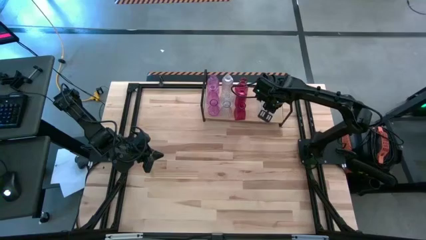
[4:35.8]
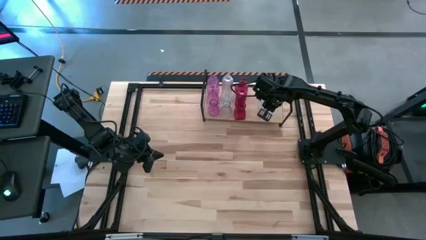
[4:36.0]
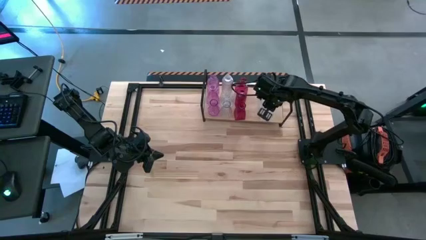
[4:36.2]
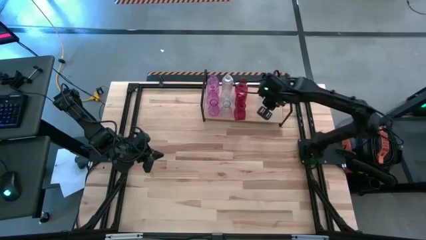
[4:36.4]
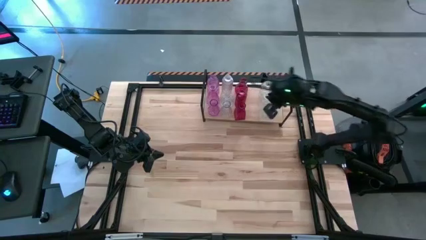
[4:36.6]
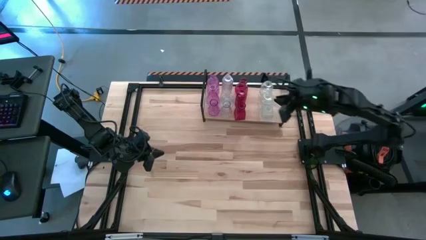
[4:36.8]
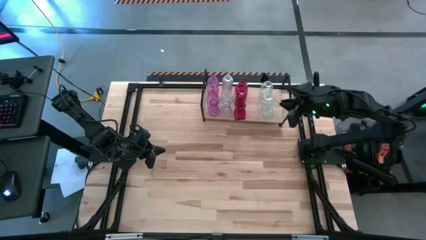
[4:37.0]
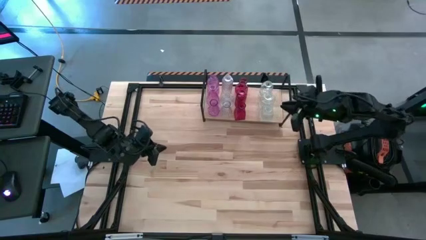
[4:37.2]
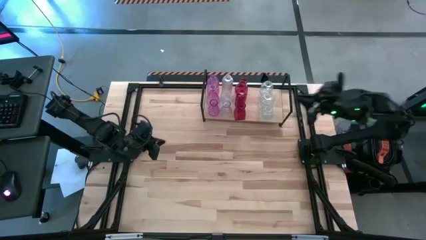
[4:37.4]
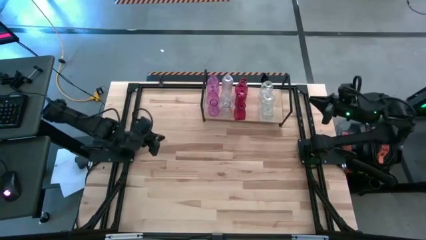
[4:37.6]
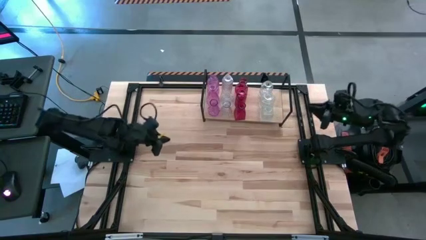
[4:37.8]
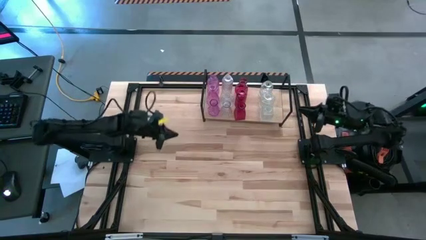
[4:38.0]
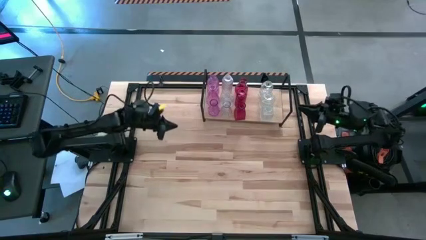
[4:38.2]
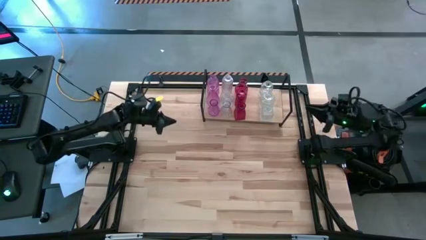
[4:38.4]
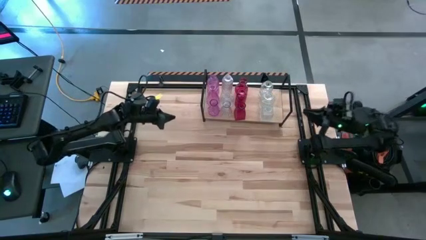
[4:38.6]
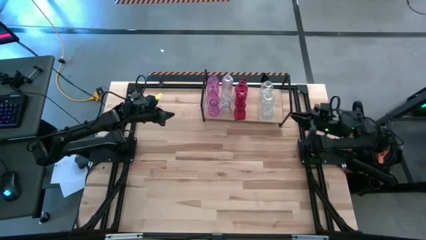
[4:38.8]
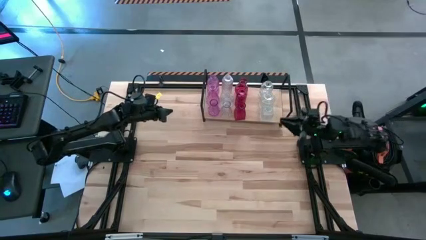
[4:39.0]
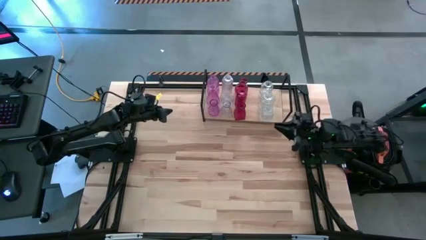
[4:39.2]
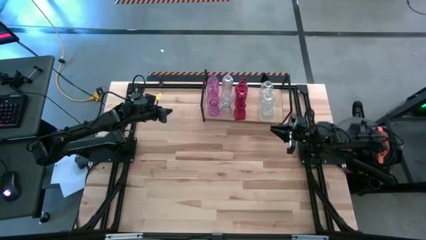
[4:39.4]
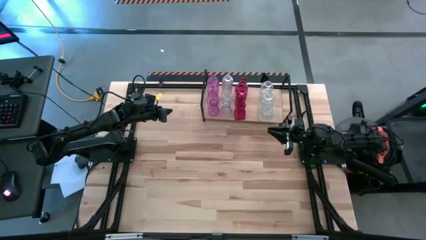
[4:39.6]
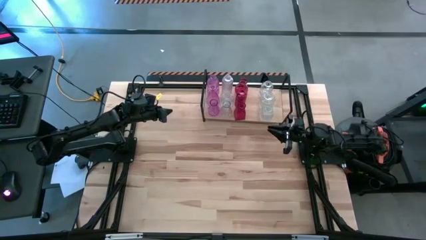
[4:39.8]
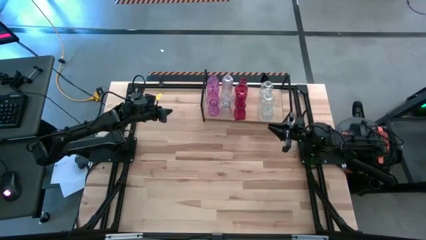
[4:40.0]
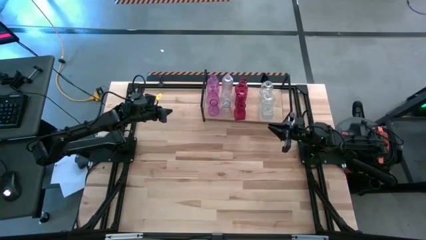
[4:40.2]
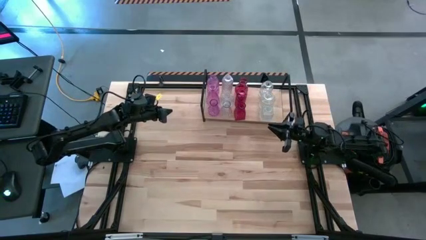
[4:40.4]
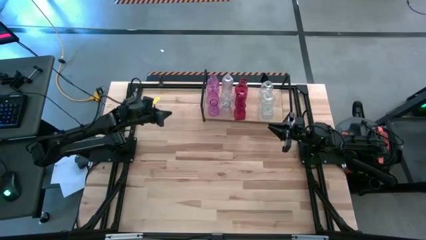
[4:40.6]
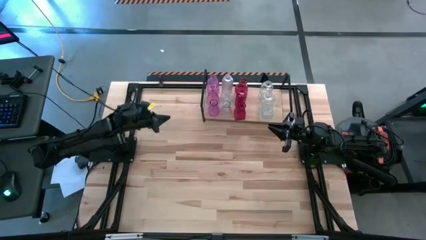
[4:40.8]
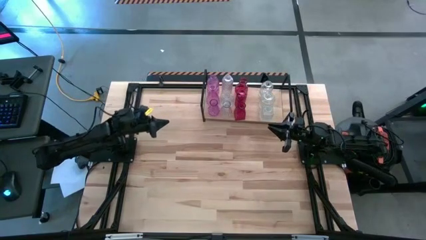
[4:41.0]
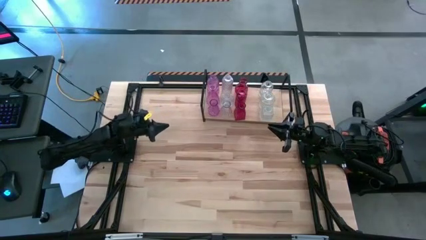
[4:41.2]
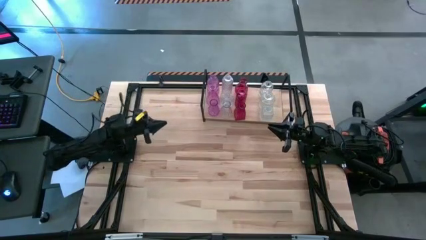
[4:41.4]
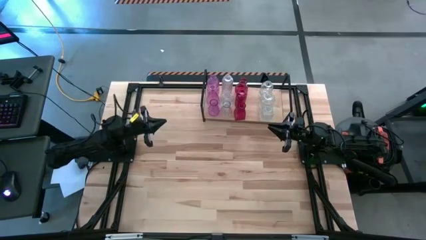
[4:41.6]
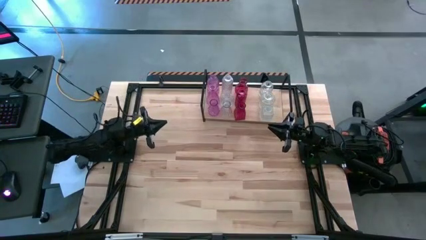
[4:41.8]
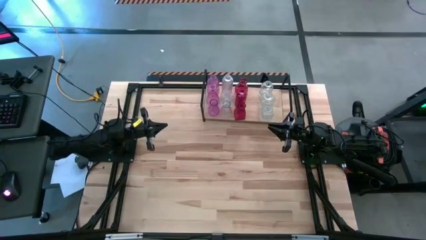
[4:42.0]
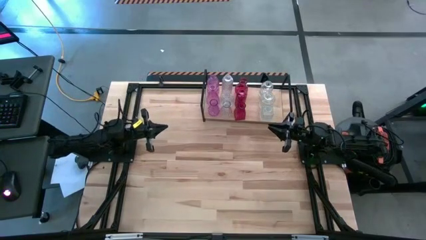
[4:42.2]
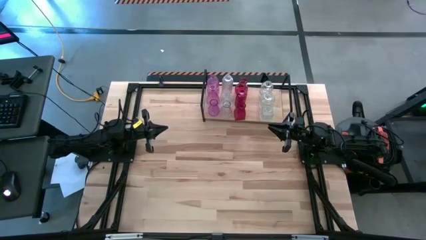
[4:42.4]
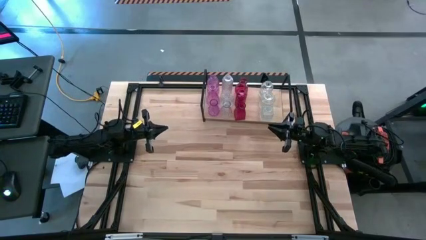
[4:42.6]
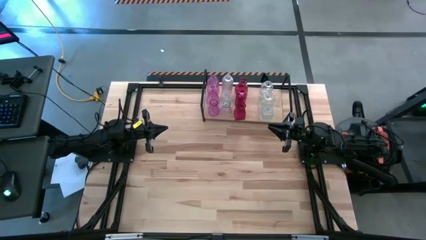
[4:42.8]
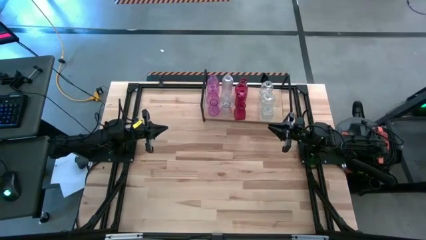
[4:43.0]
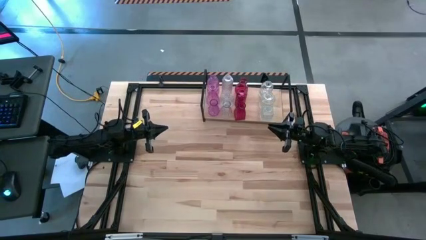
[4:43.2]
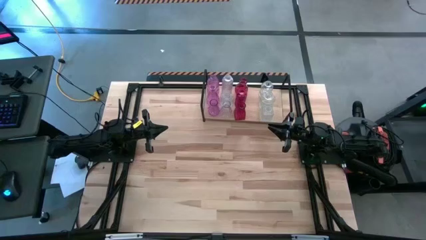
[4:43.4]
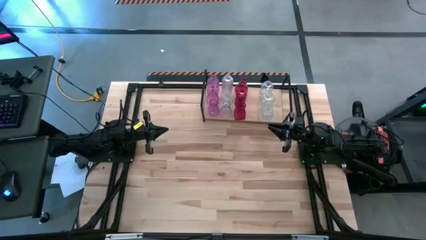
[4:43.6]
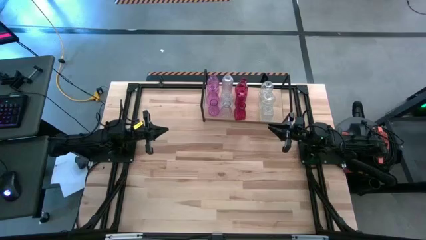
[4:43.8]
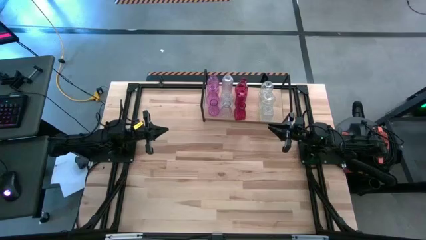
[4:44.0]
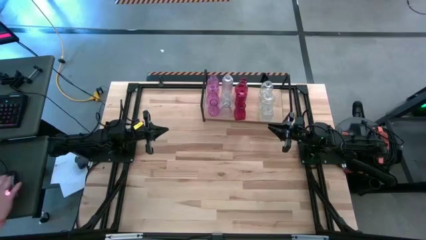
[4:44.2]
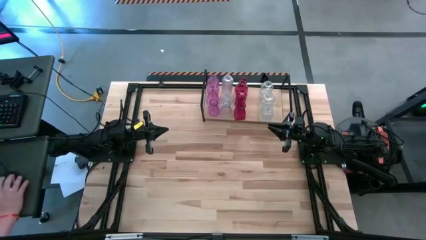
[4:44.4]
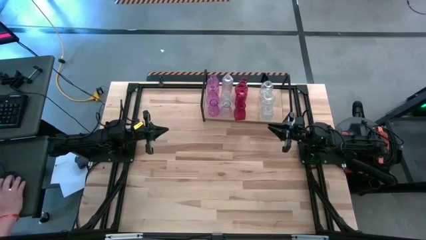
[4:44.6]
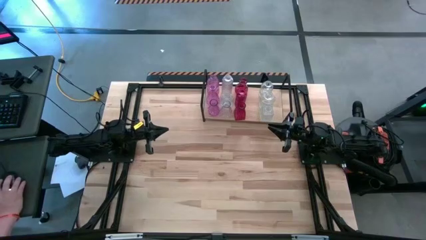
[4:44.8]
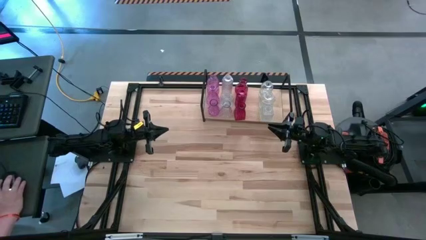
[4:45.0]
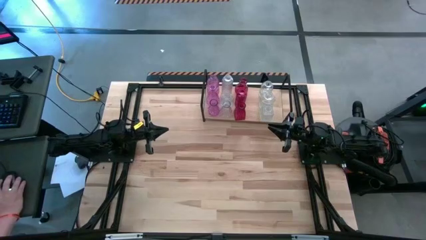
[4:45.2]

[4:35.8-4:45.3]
Task: sort vases onto shelf
Return to Home Position

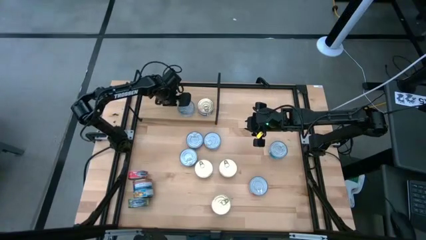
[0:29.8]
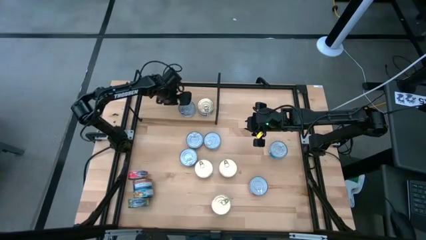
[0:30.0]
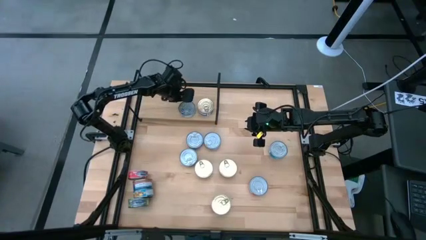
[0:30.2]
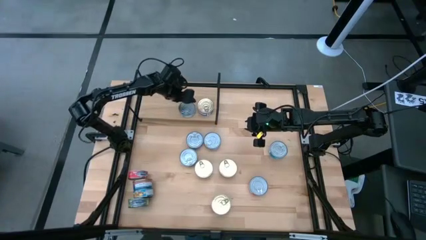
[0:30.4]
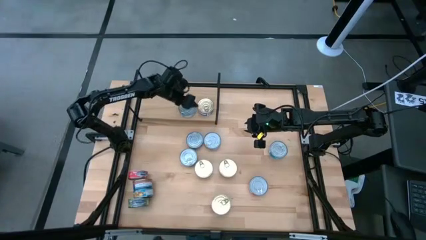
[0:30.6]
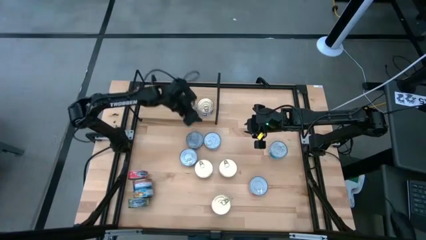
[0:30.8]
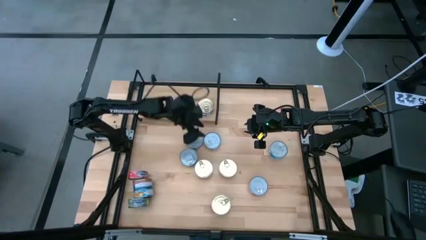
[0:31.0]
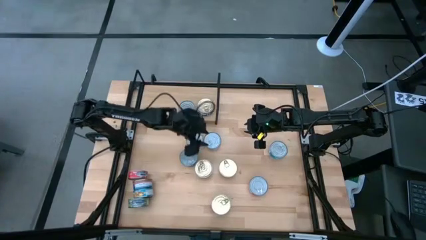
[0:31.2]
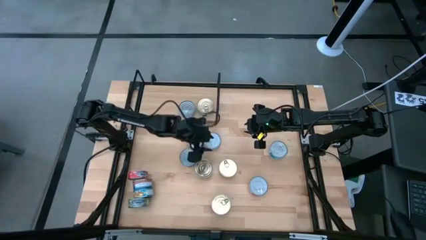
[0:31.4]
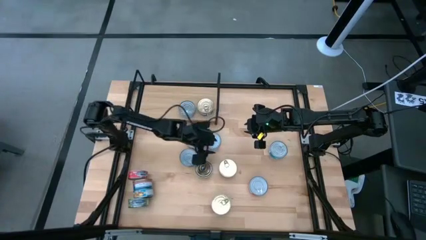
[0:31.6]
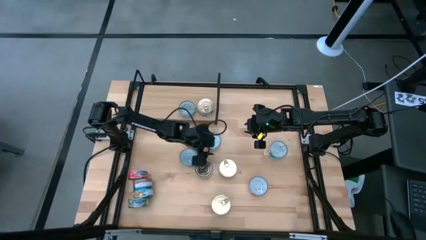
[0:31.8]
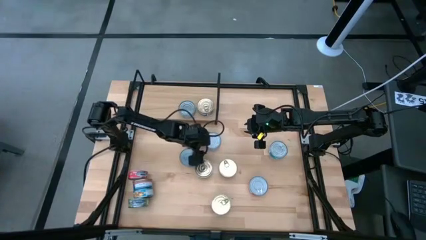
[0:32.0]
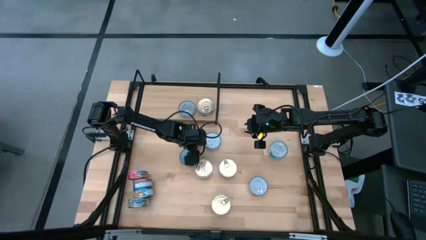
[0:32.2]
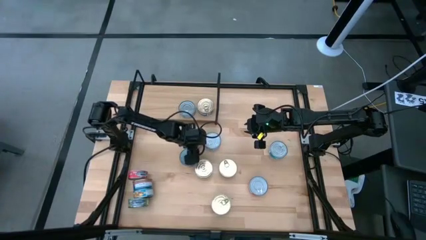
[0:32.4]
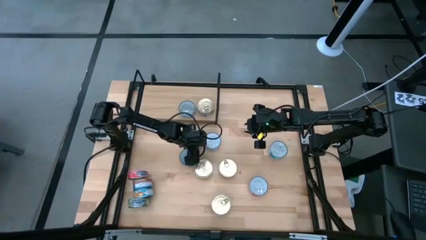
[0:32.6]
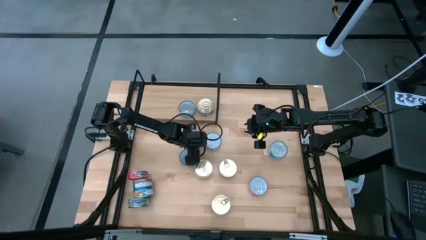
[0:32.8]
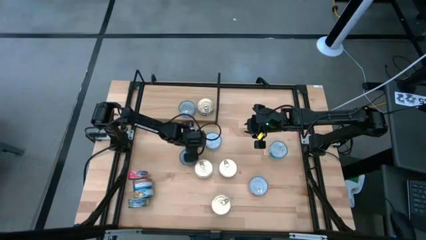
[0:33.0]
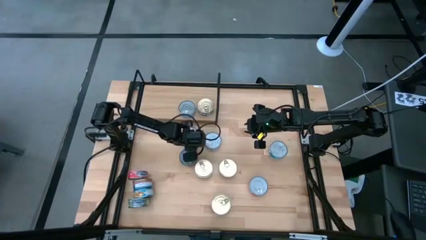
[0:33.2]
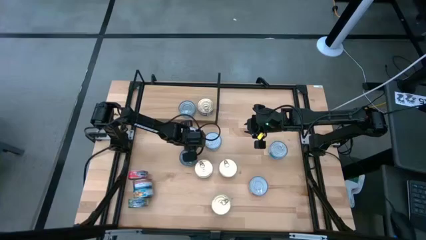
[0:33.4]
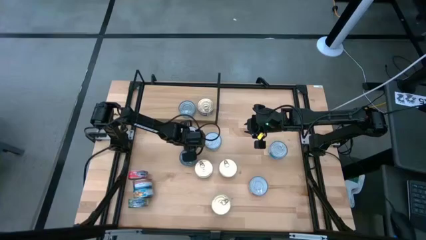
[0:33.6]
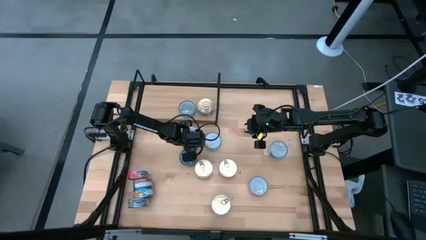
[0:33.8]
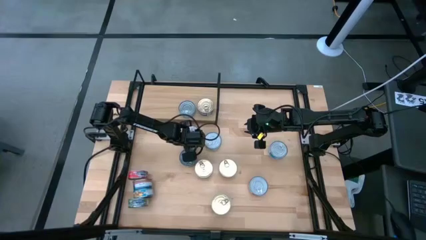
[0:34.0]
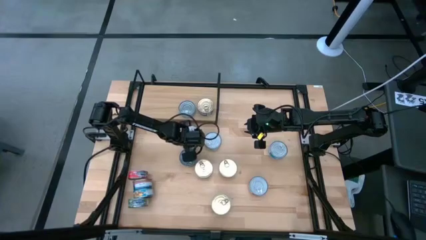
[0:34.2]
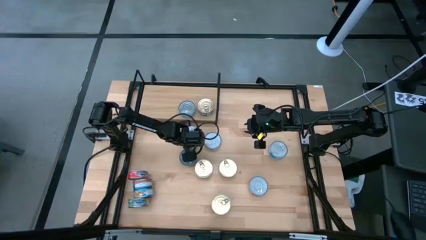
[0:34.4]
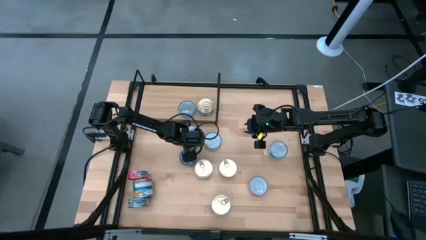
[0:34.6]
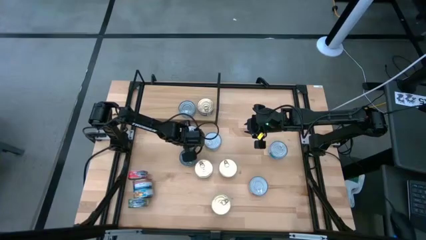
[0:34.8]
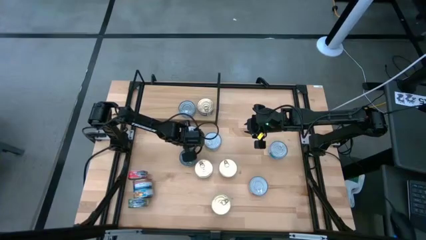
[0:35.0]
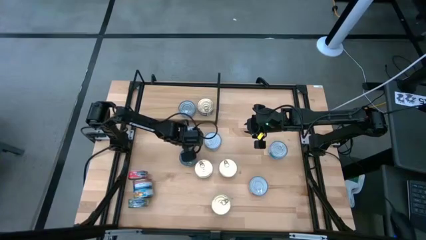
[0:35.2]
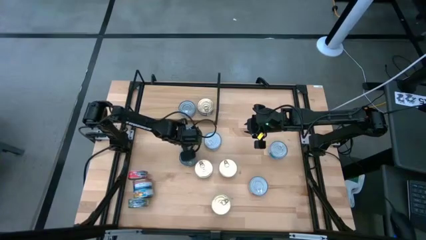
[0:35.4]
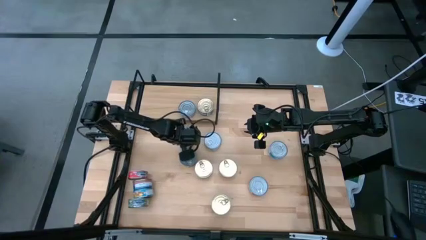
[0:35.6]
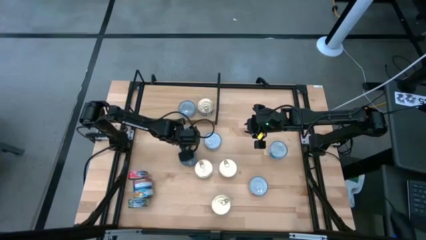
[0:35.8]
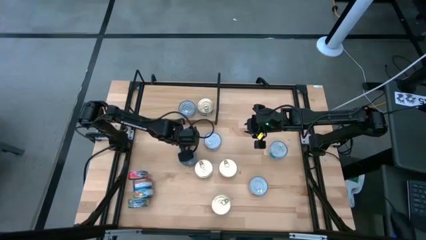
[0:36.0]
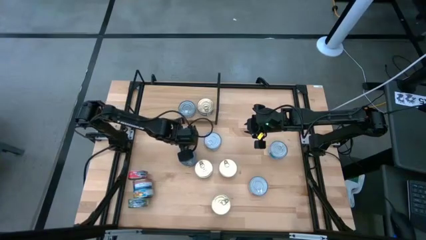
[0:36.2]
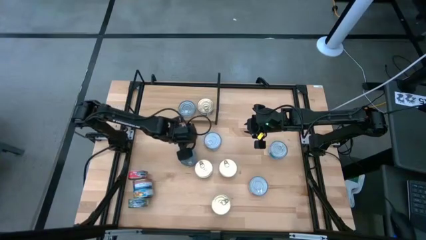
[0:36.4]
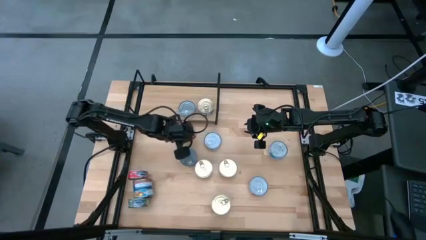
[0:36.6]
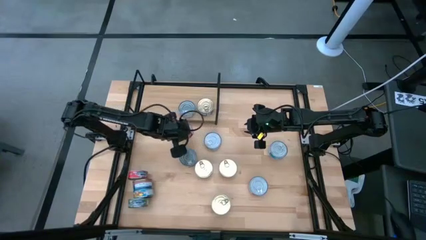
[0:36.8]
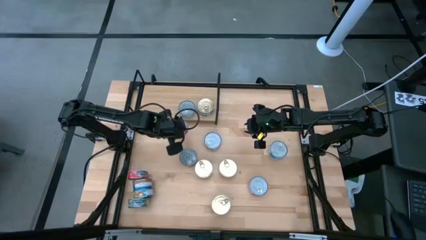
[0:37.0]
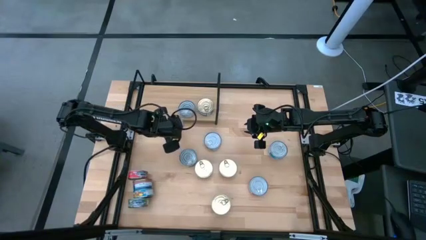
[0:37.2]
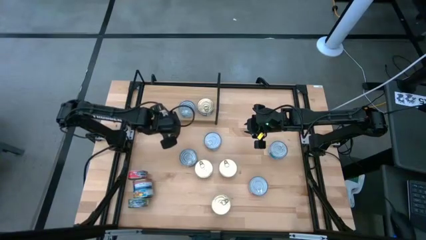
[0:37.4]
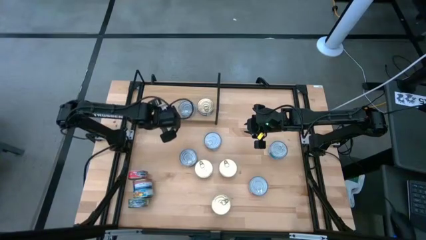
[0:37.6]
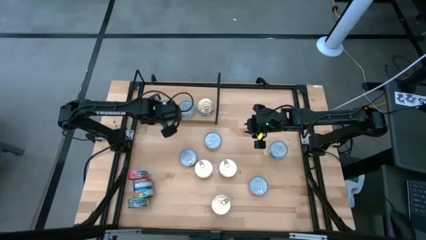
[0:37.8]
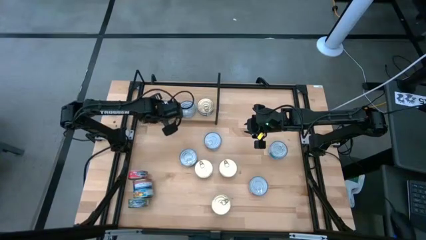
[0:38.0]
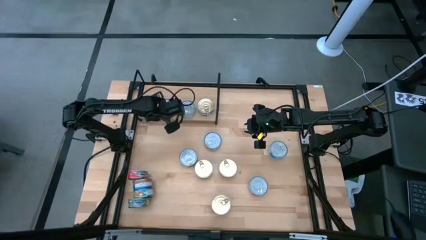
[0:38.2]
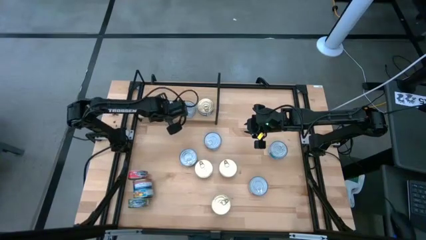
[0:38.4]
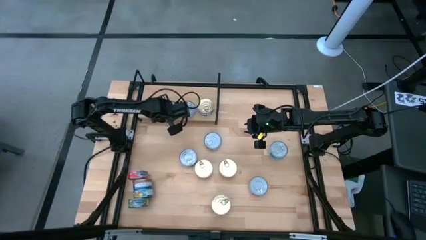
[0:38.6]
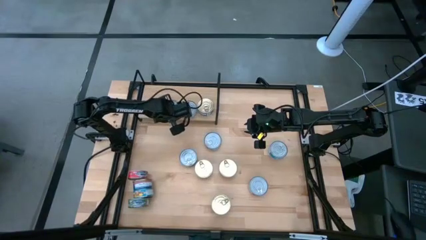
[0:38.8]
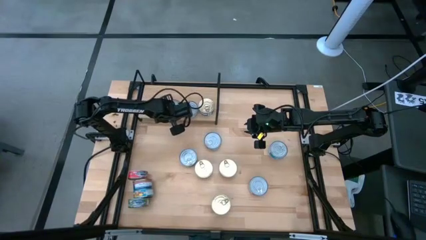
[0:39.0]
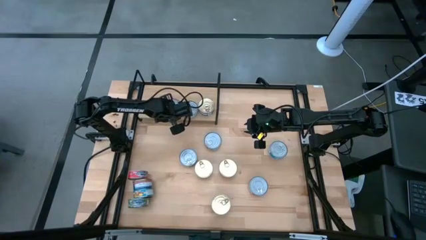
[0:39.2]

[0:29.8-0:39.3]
Task: Stack canned seafood by type on shelf
Put the middle red tuna can on the shelf
